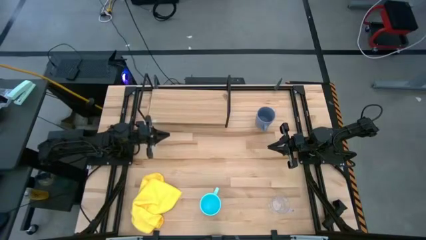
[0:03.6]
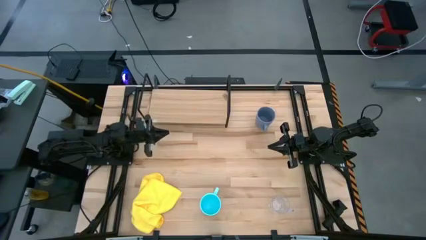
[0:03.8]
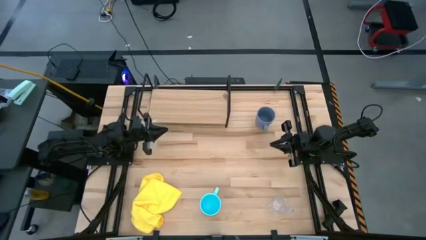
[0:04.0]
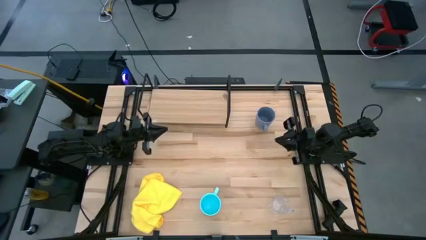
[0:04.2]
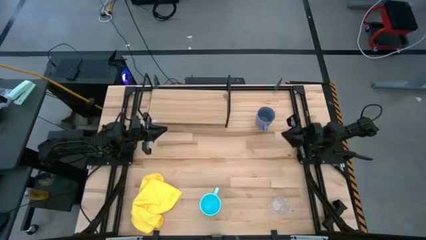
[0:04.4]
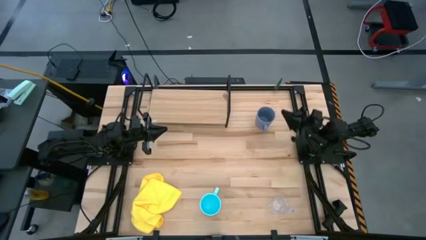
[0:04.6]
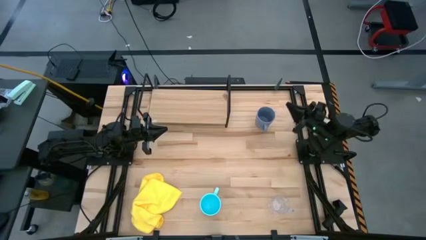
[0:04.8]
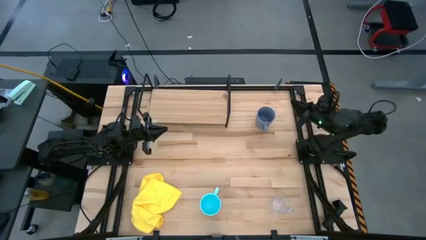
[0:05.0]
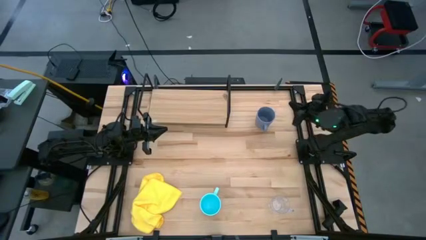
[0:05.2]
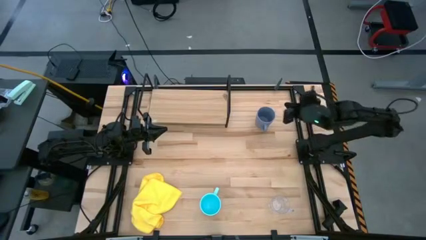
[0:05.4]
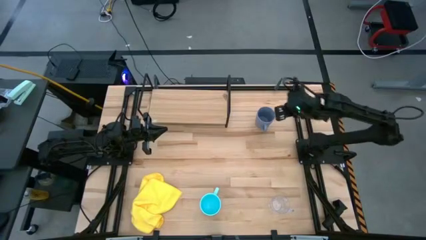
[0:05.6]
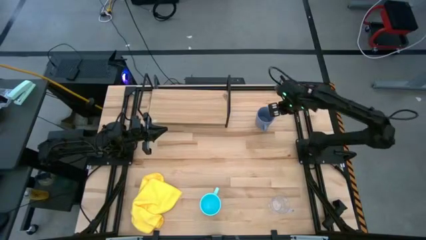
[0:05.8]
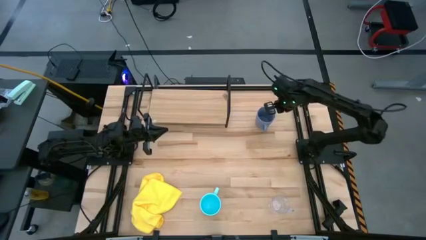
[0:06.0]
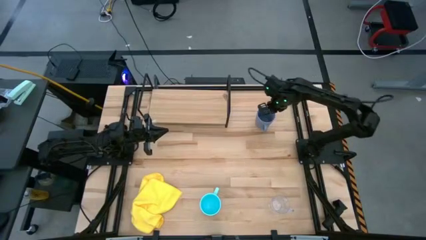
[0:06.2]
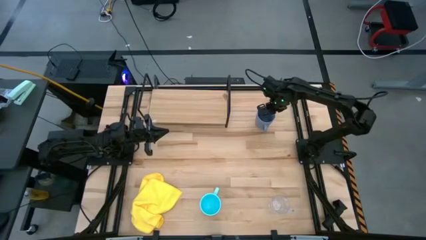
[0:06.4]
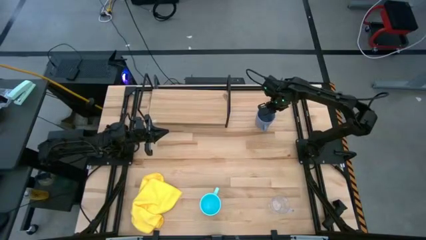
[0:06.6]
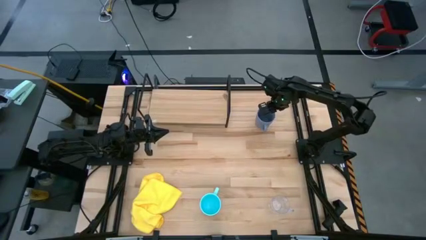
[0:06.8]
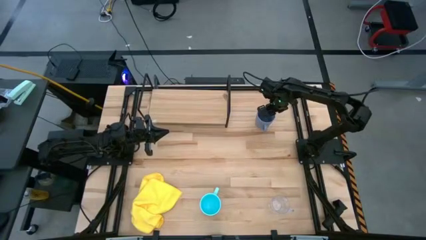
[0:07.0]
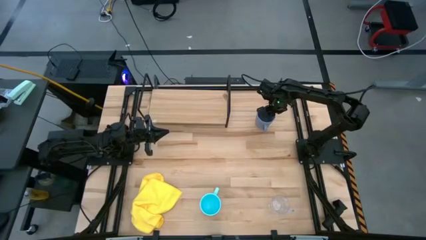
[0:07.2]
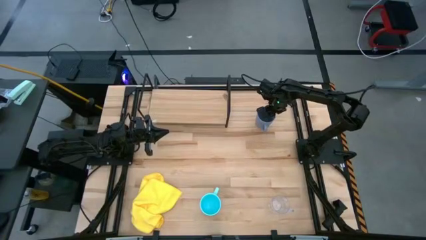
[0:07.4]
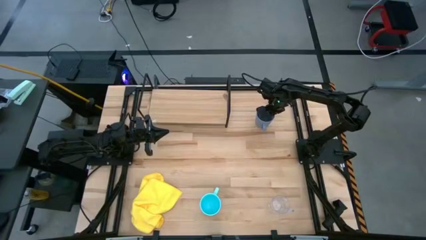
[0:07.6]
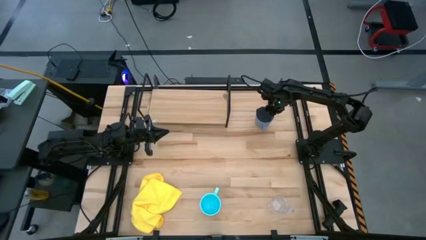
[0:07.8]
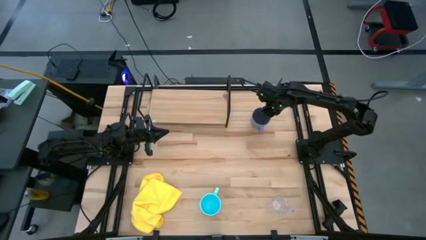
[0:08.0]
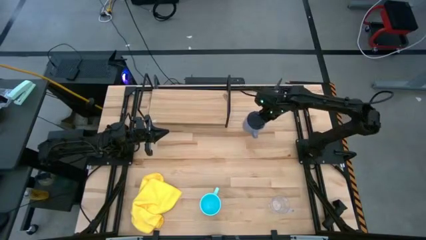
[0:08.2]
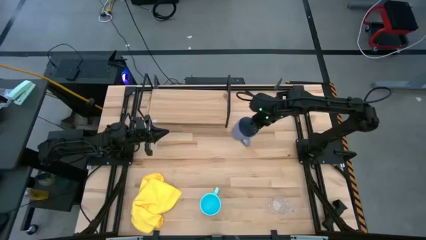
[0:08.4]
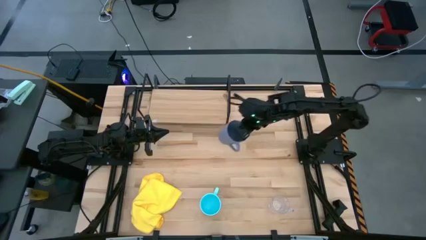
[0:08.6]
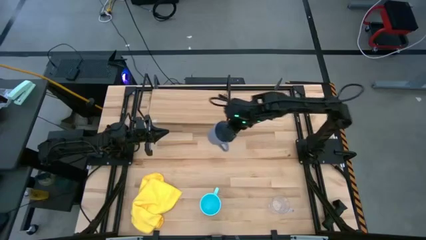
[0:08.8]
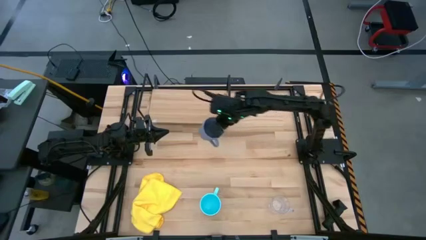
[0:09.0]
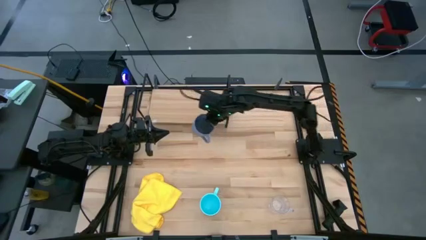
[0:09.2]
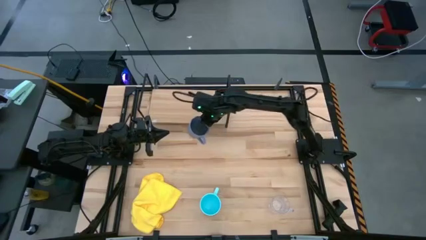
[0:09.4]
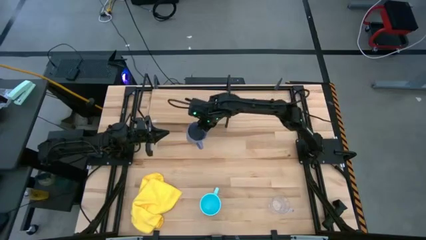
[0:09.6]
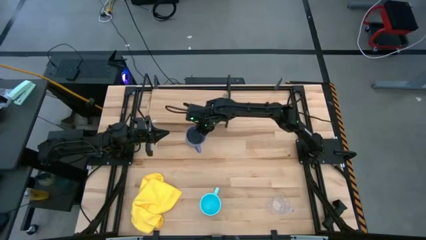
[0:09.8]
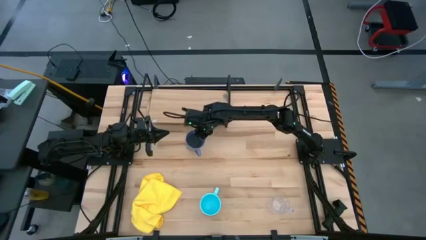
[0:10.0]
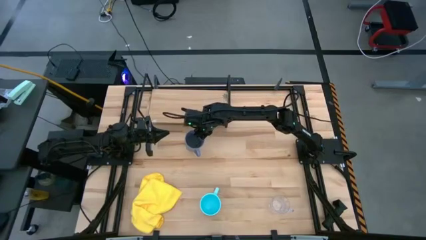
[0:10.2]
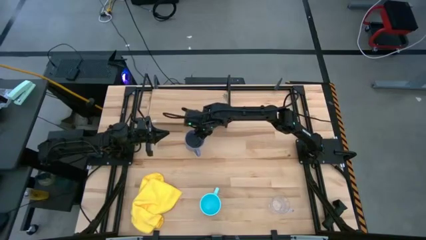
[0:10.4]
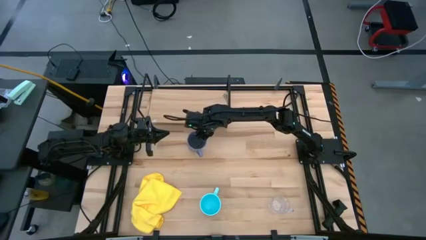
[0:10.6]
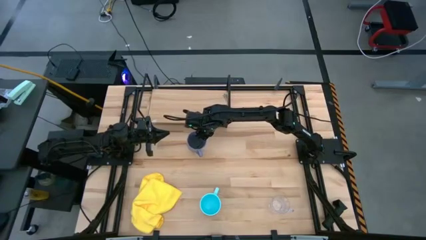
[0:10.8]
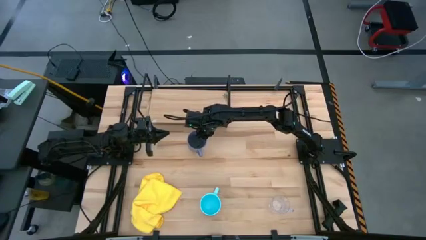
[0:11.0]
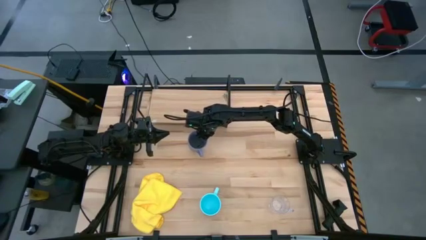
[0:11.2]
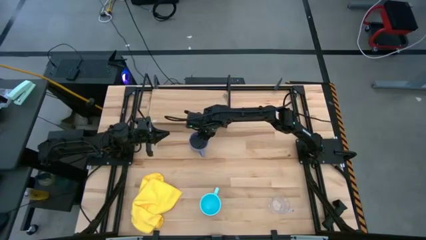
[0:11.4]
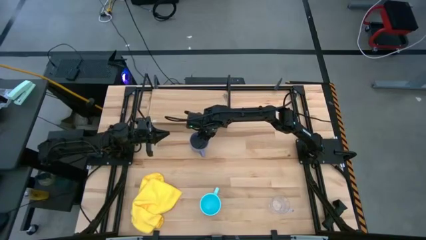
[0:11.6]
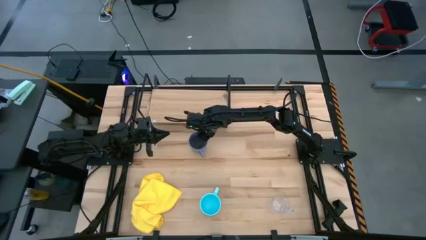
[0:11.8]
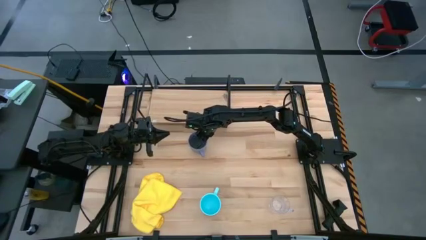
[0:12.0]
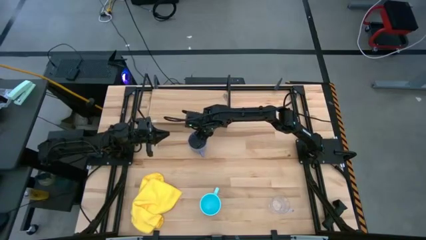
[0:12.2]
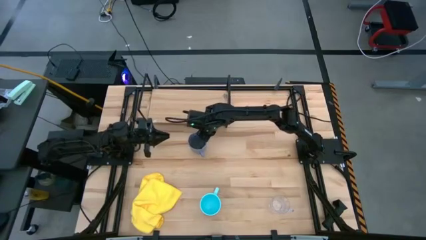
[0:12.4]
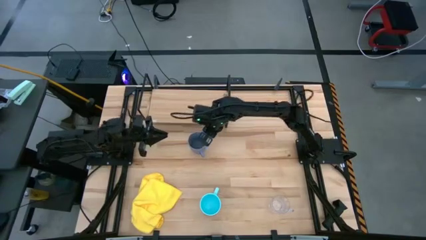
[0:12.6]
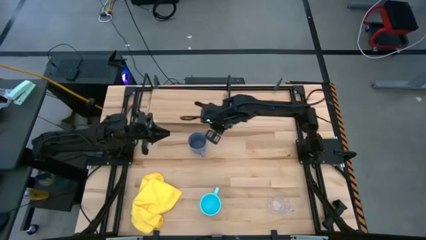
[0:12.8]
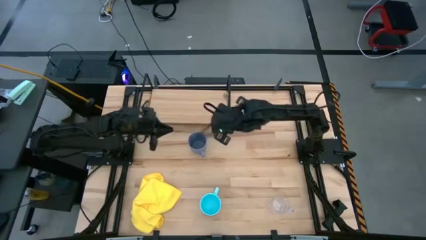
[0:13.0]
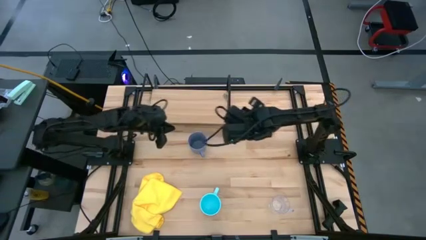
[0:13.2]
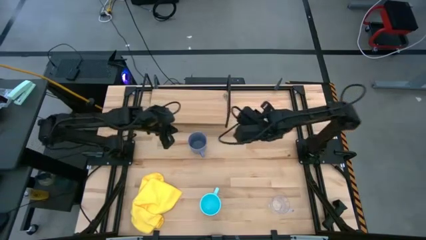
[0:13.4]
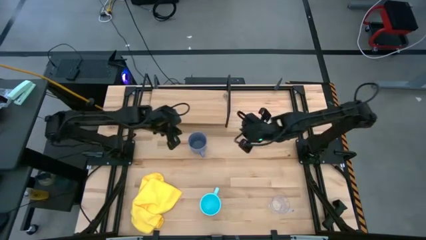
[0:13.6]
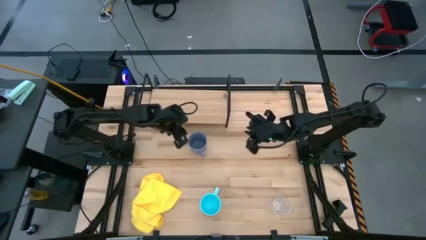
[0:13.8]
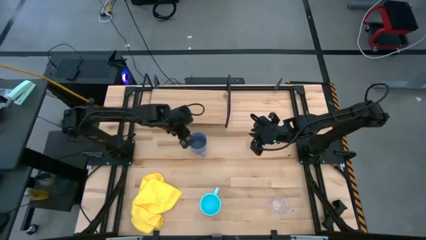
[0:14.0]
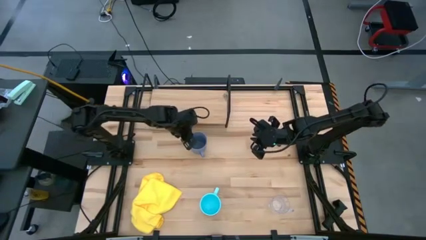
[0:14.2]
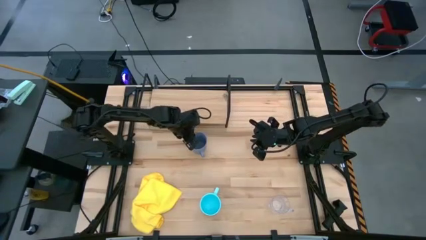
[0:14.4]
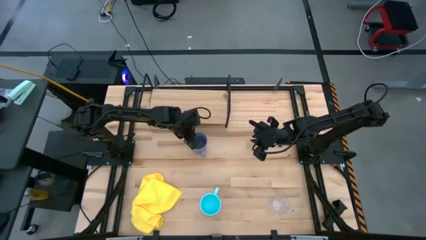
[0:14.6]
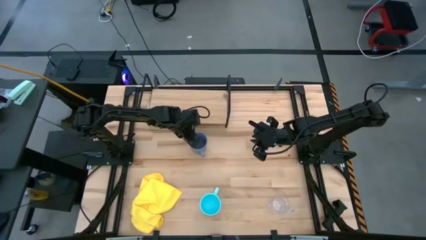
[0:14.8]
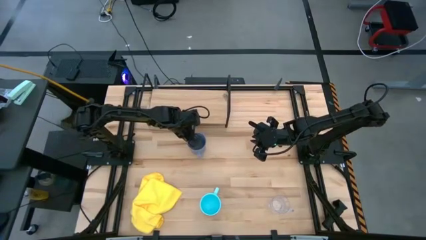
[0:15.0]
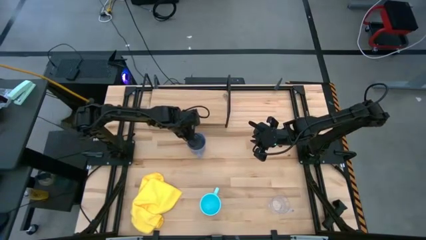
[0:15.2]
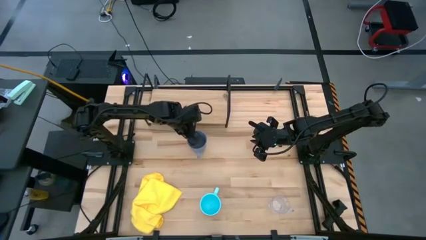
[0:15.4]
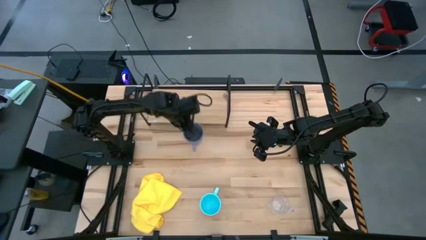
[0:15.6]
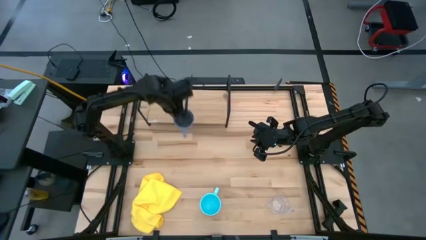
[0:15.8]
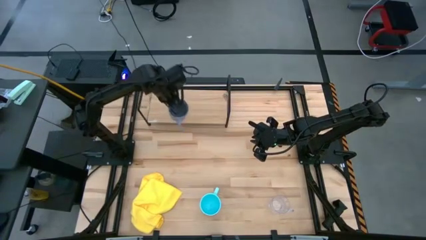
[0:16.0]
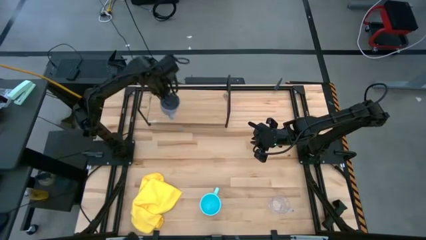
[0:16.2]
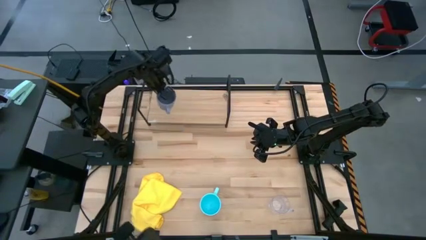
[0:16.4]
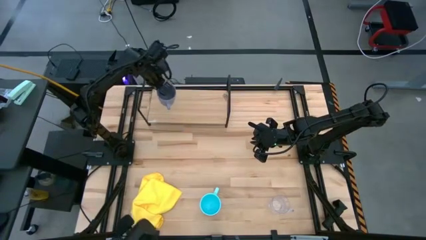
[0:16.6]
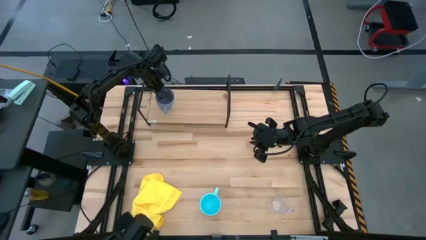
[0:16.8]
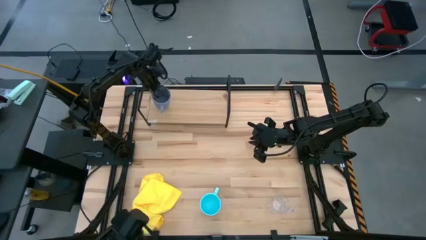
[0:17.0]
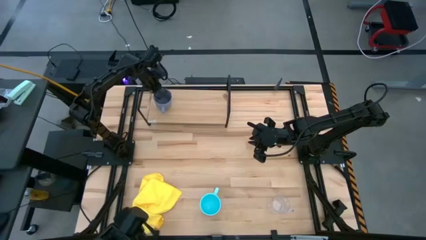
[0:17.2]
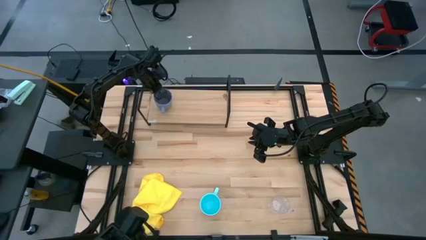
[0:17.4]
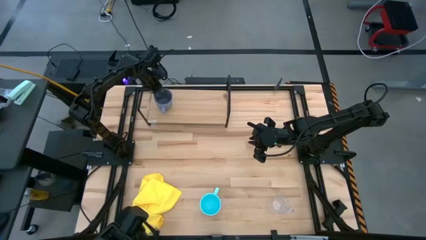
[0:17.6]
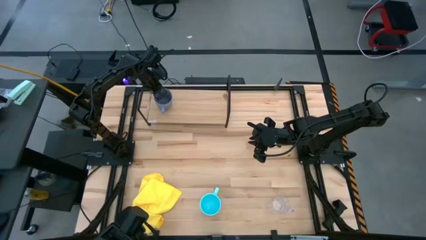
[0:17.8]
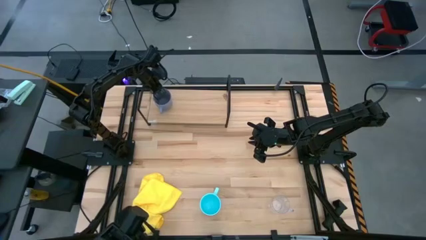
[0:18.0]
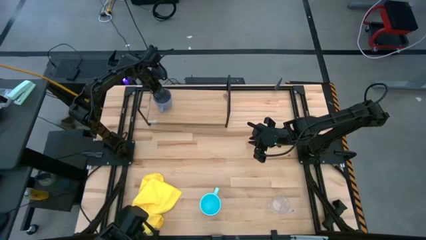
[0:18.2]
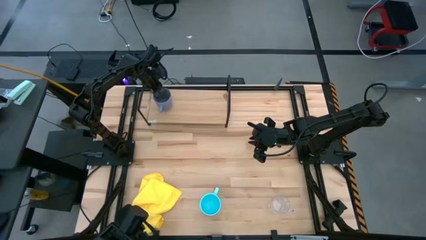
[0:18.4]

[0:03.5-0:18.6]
Task: Stack small to large cups/mugs on shelf
Put the blue mug on the shelf
